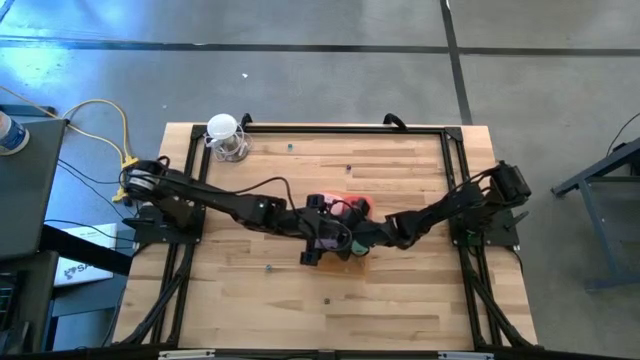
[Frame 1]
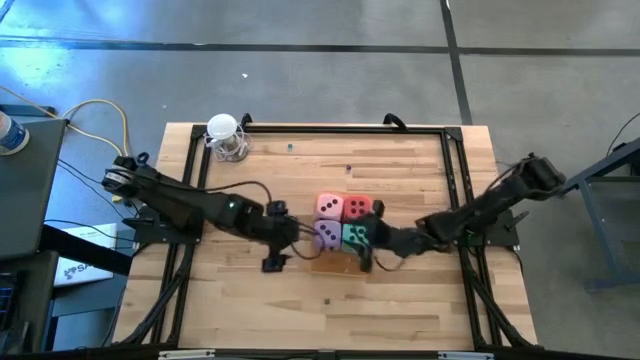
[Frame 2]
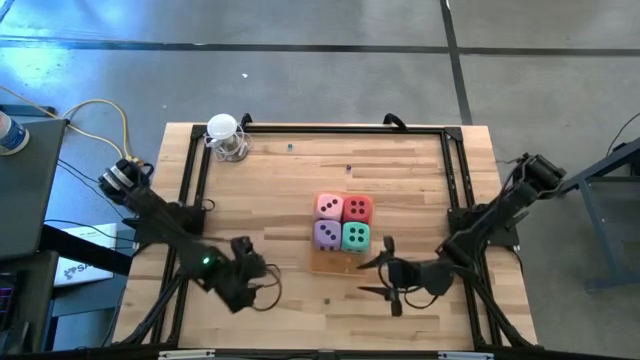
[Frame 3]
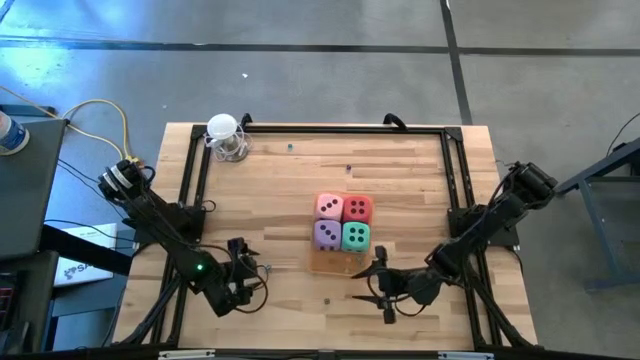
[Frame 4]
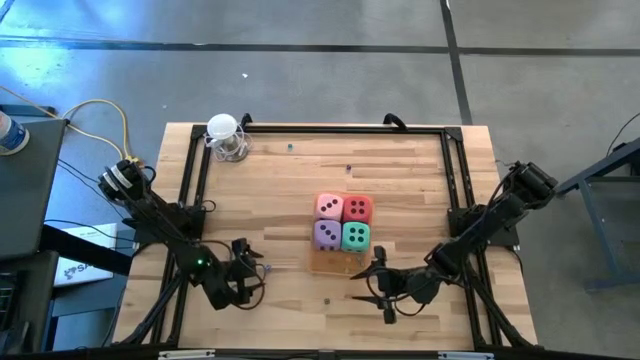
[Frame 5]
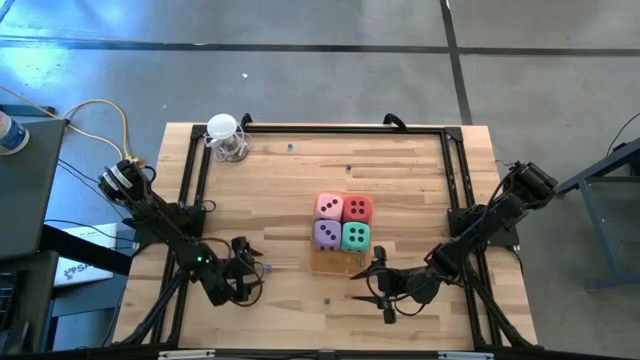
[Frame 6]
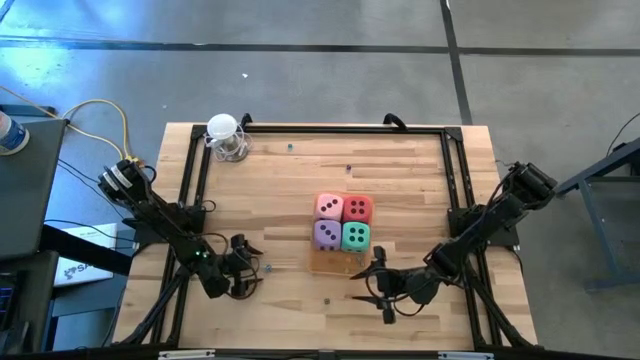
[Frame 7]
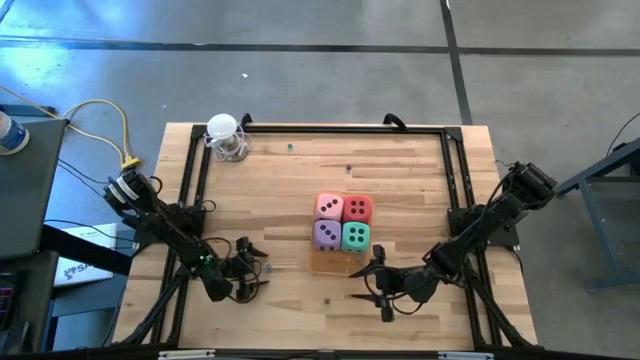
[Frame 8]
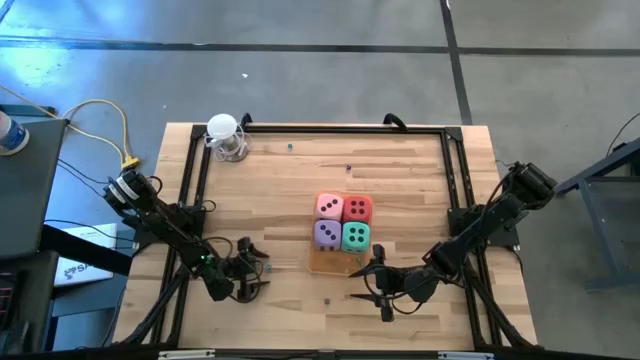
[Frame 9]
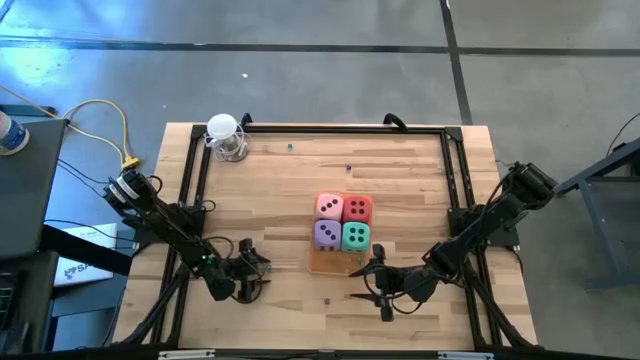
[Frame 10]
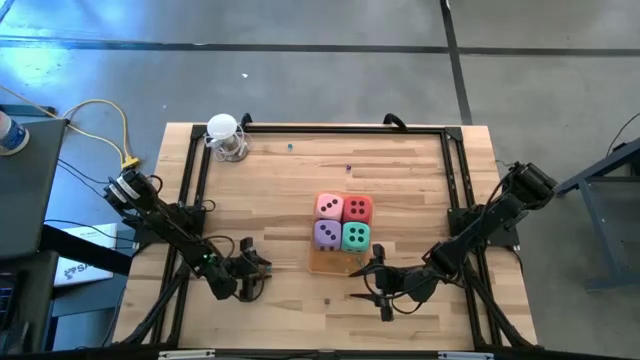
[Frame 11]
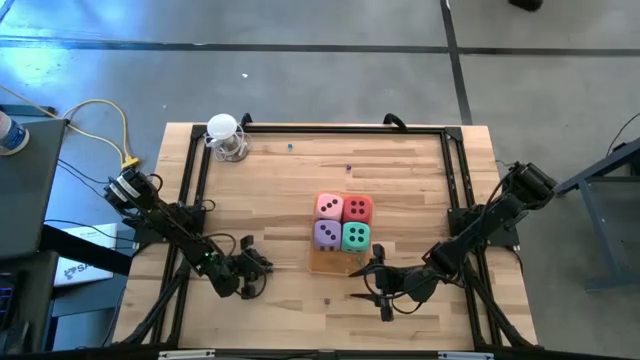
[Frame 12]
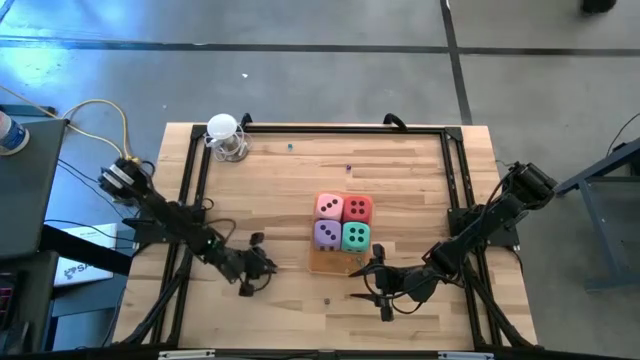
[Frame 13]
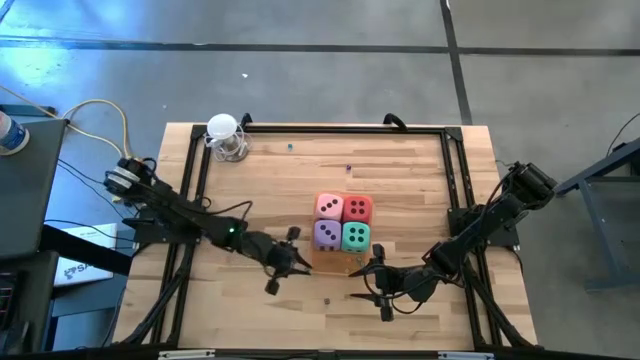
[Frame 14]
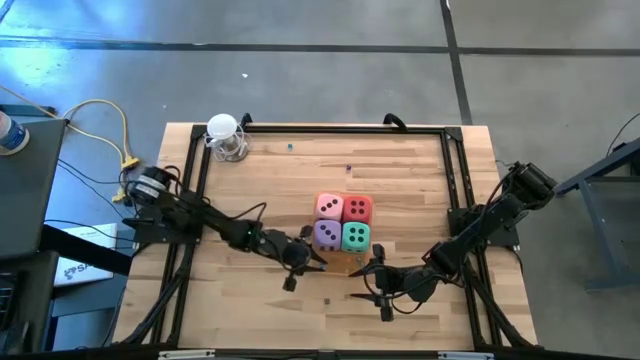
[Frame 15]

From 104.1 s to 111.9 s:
Task: Pick & Place Dice
Put the small blue die into the orange bin

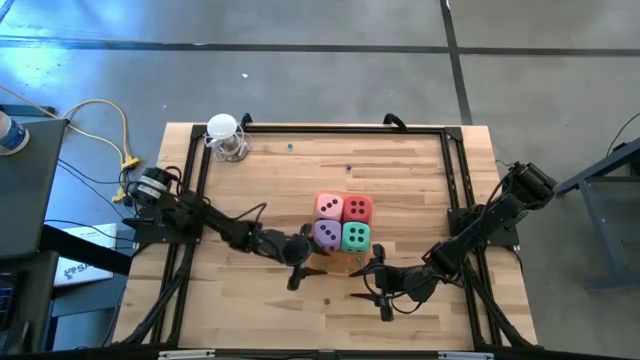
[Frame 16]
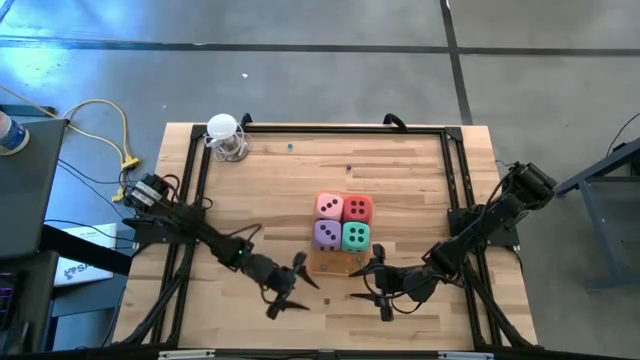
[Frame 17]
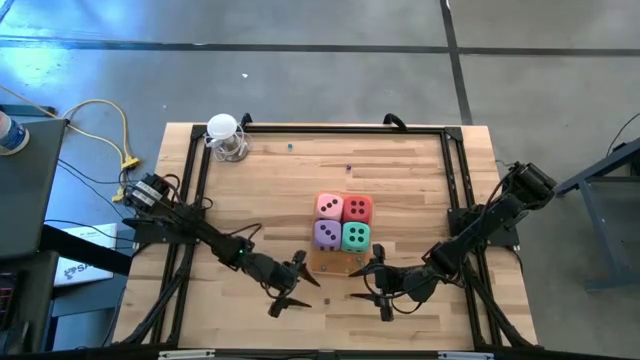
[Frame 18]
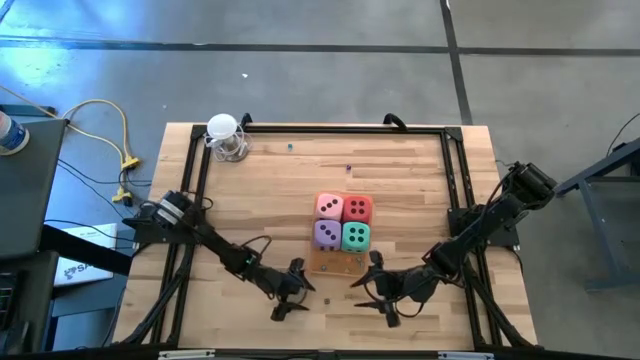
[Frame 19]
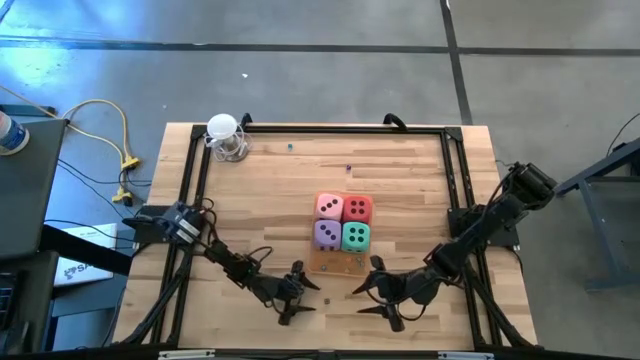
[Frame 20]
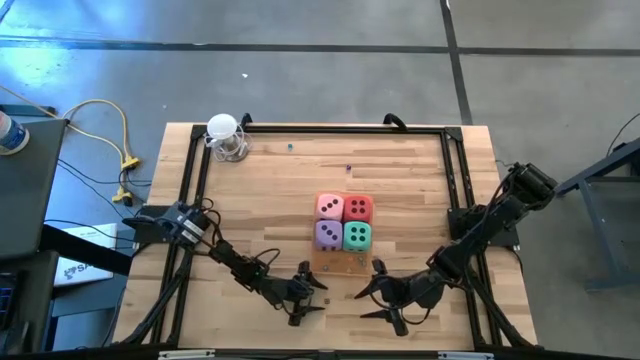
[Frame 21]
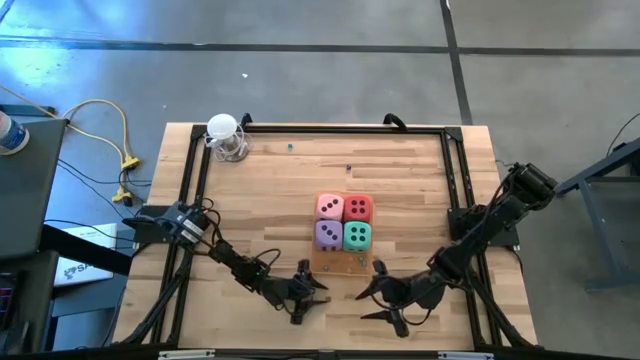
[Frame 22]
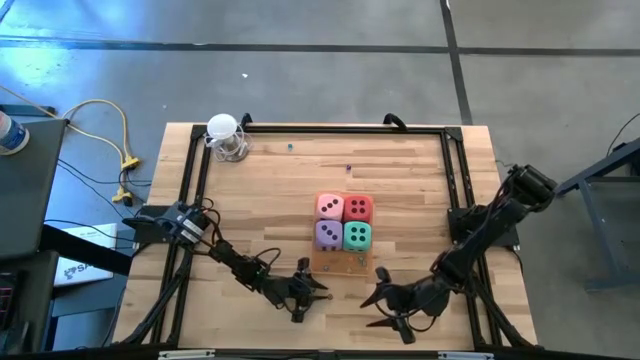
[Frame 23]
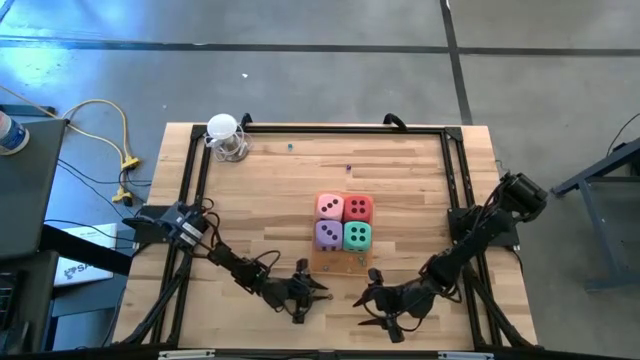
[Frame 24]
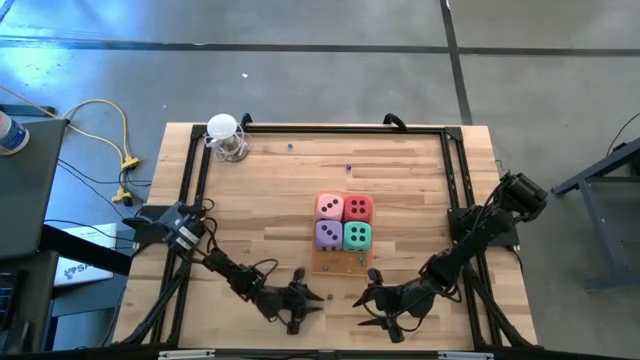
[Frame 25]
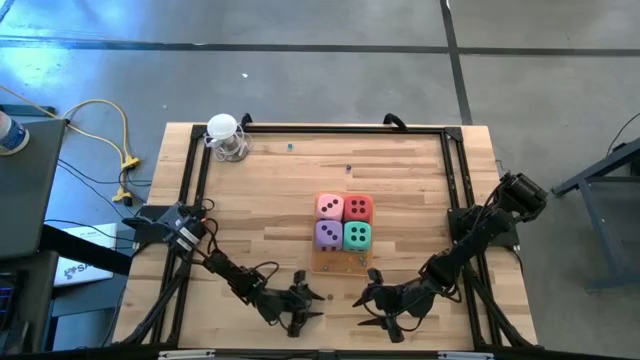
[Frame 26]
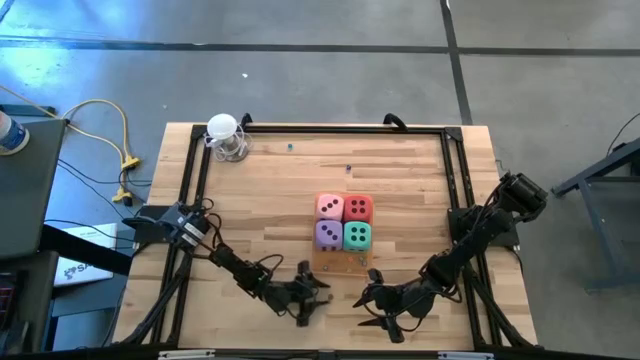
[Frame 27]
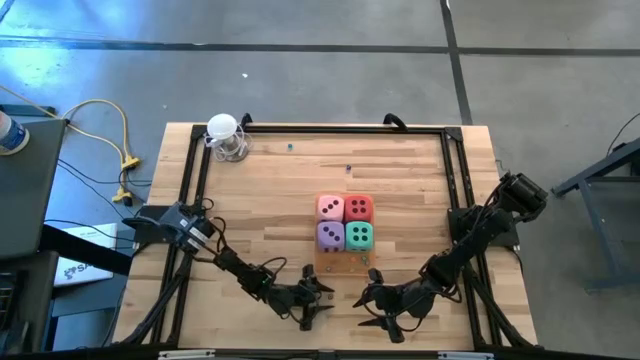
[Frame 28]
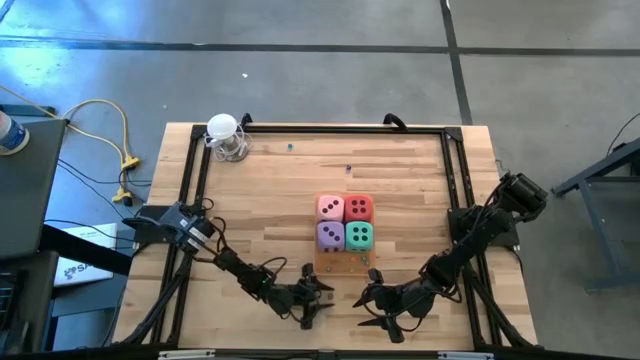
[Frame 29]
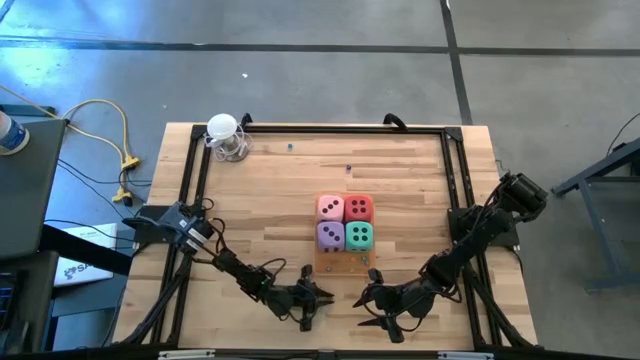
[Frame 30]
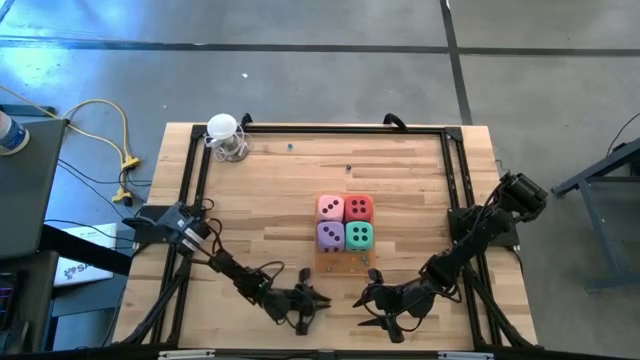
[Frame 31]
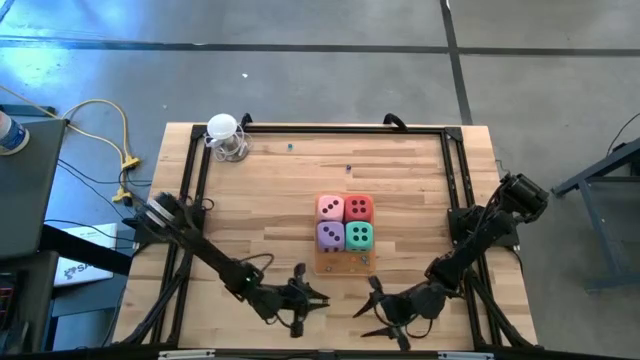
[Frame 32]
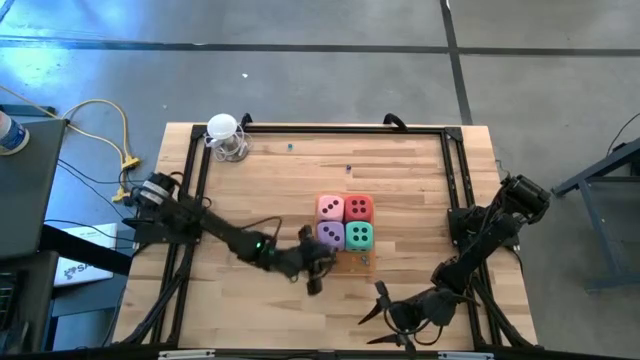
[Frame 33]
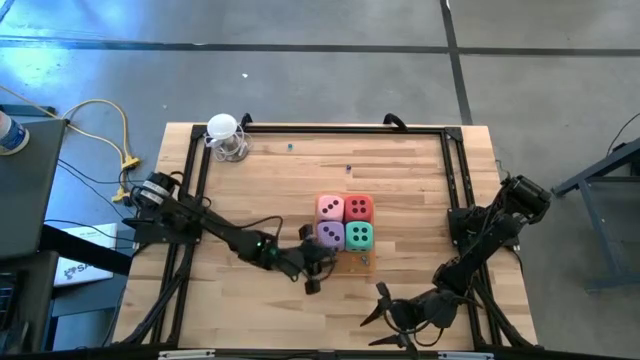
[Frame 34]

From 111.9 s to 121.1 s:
Put the small black die into the orange bin

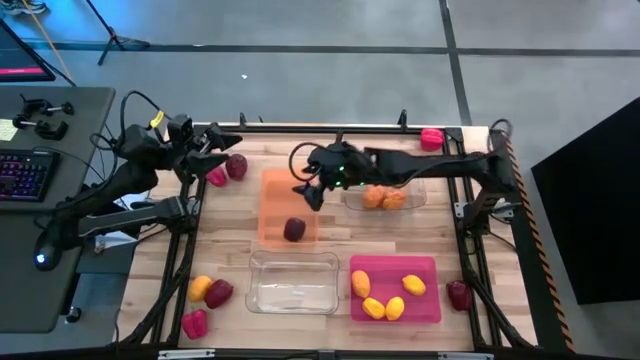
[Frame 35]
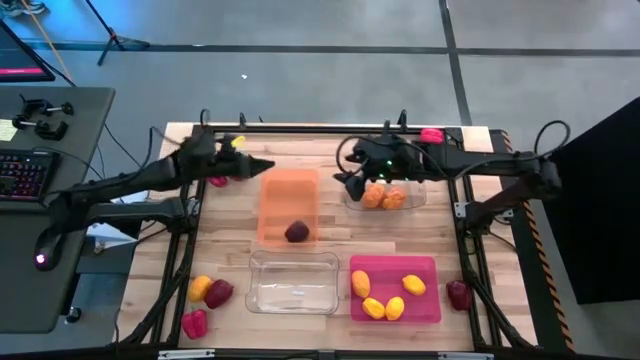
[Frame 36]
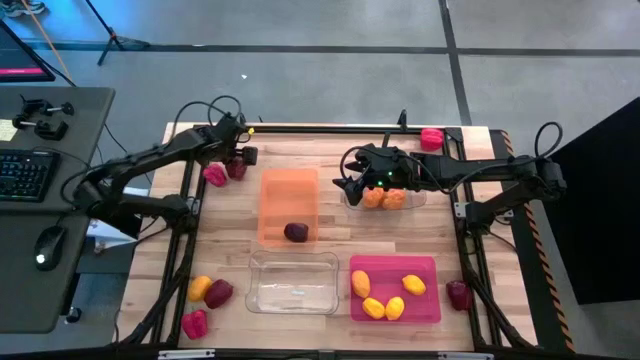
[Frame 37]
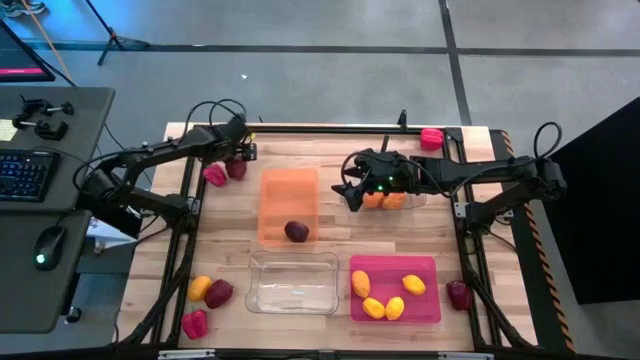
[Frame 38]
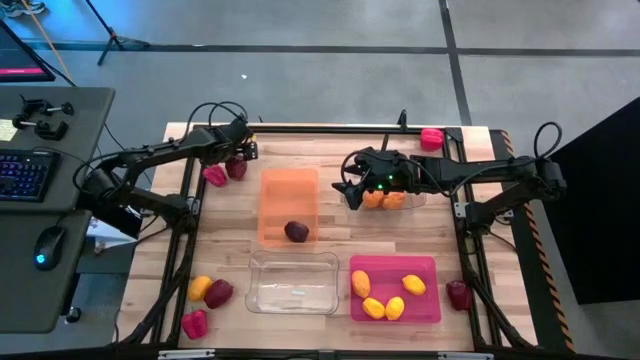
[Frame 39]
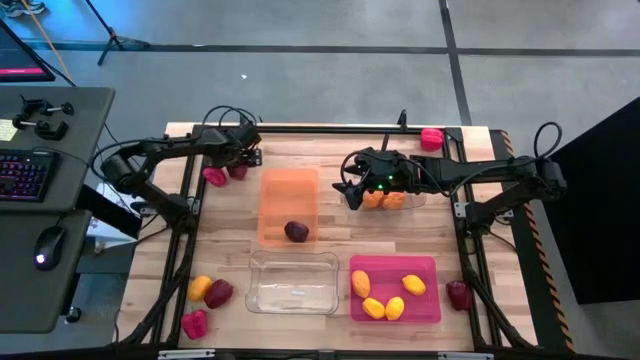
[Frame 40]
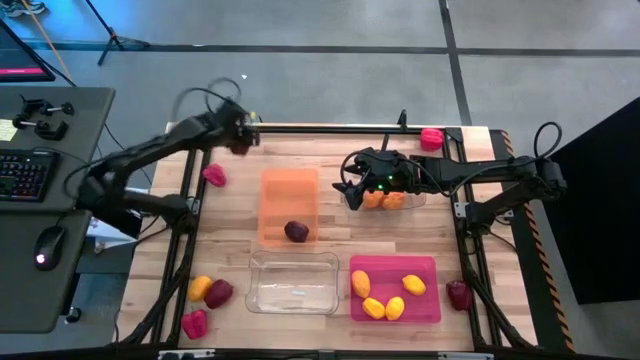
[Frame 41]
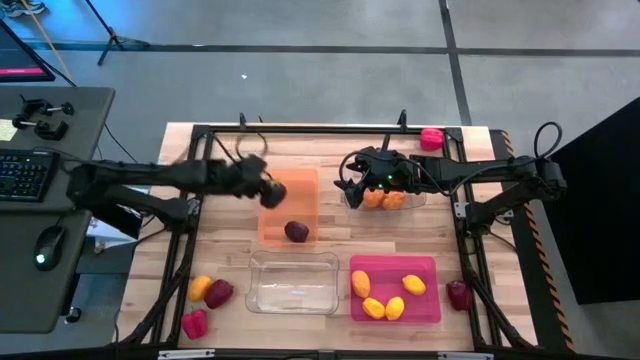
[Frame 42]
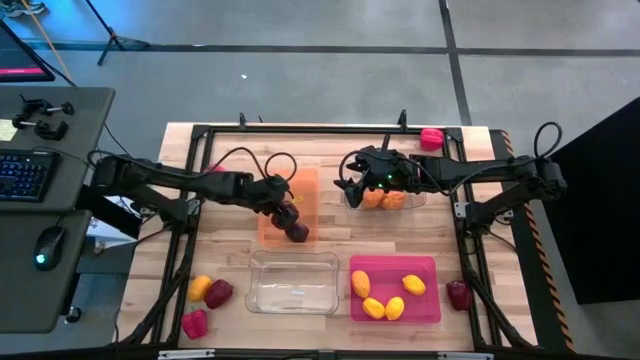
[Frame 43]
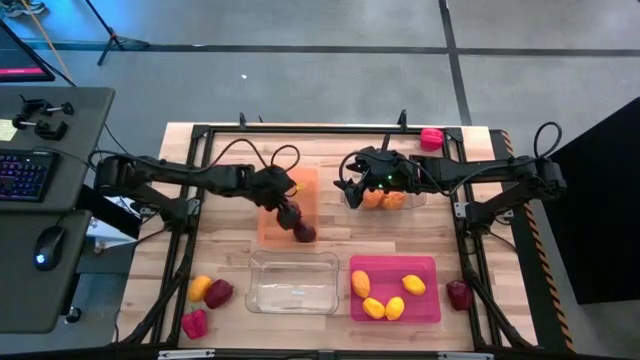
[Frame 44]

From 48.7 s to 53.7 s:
Task: Sort produce into baskets
Put the top apple into the orange bin
